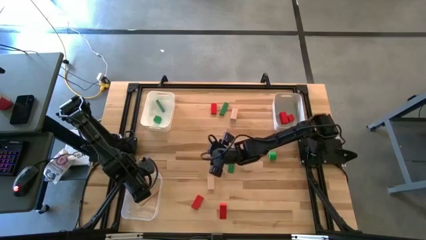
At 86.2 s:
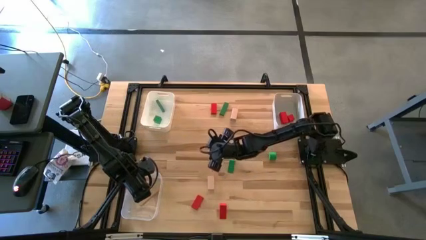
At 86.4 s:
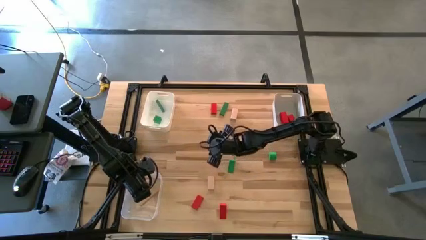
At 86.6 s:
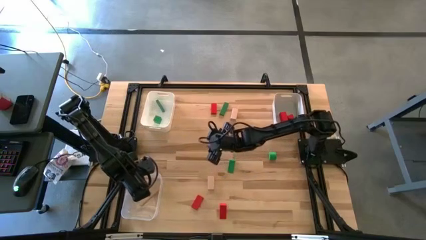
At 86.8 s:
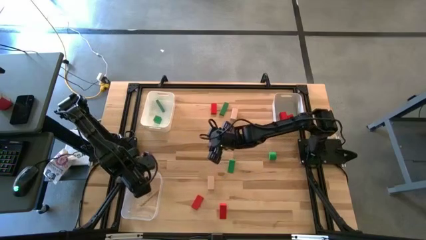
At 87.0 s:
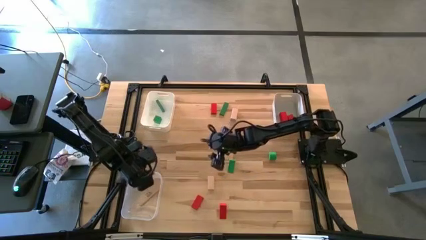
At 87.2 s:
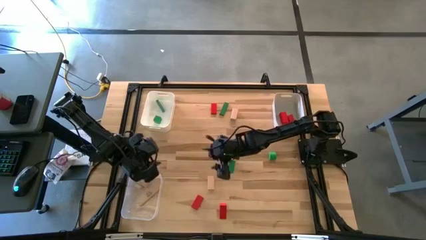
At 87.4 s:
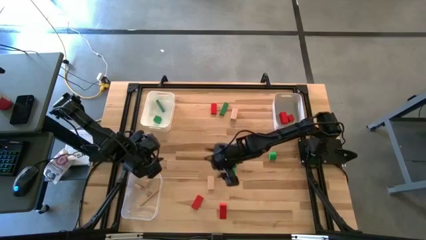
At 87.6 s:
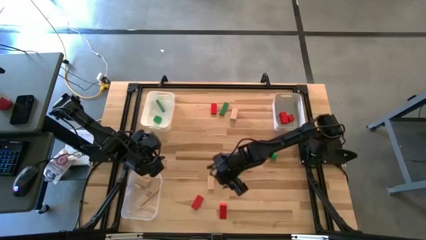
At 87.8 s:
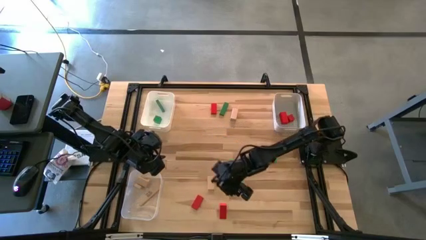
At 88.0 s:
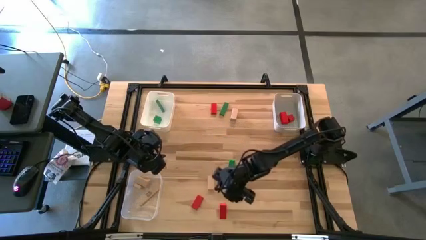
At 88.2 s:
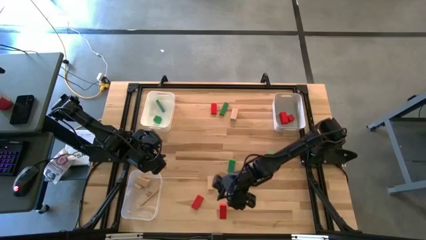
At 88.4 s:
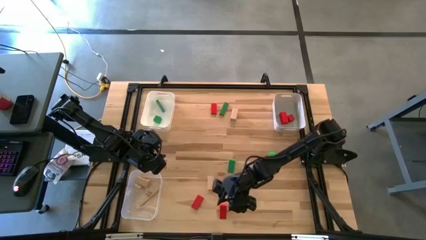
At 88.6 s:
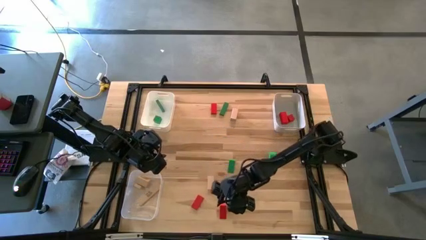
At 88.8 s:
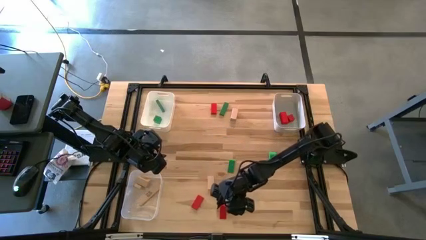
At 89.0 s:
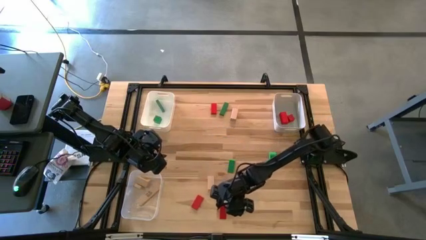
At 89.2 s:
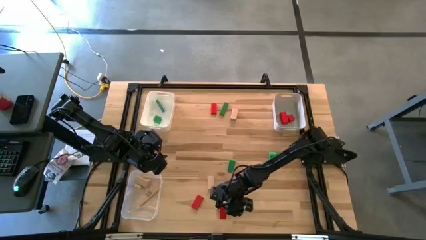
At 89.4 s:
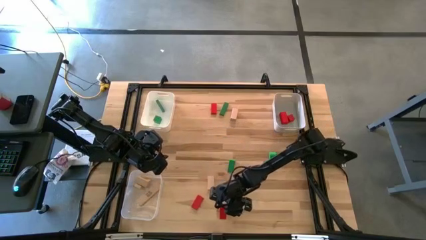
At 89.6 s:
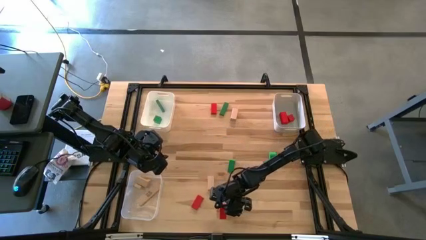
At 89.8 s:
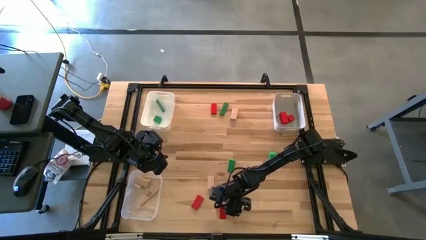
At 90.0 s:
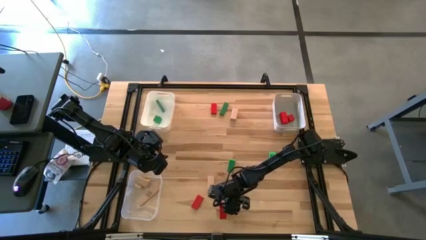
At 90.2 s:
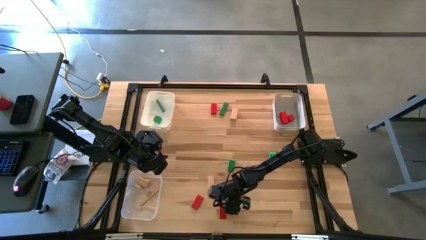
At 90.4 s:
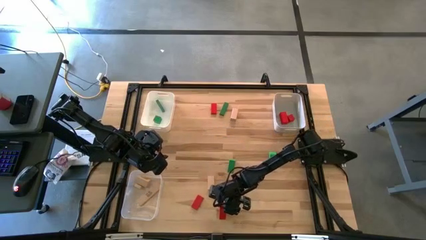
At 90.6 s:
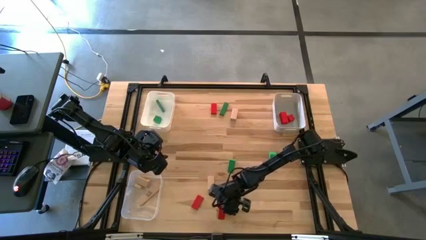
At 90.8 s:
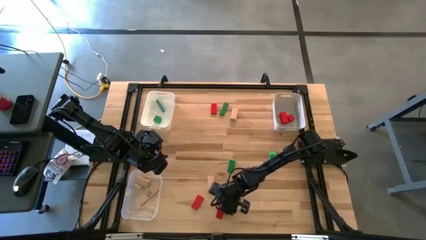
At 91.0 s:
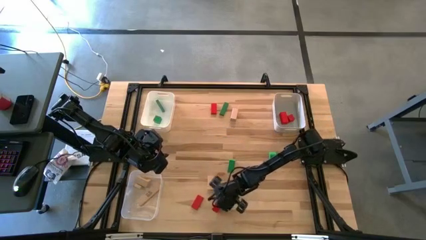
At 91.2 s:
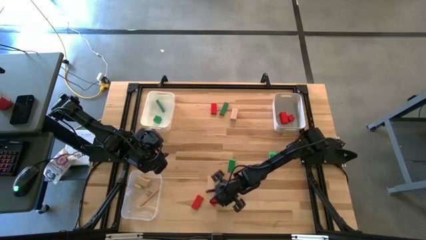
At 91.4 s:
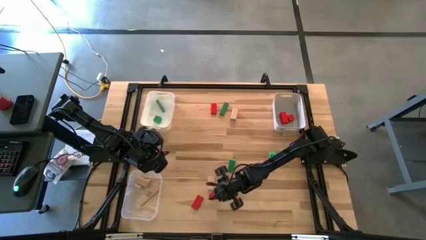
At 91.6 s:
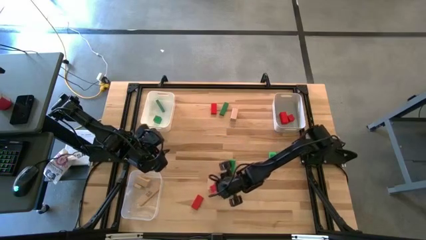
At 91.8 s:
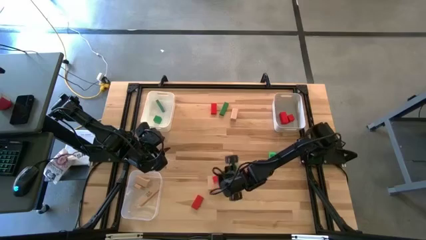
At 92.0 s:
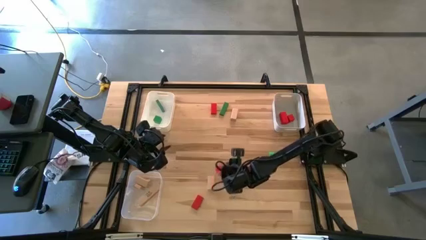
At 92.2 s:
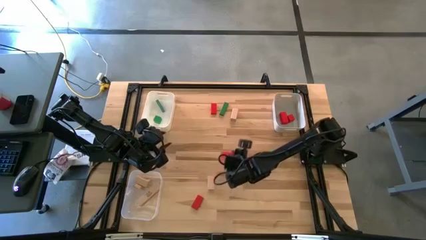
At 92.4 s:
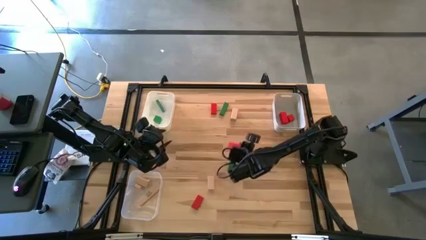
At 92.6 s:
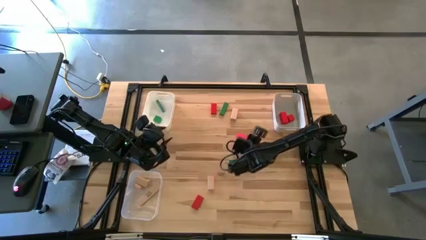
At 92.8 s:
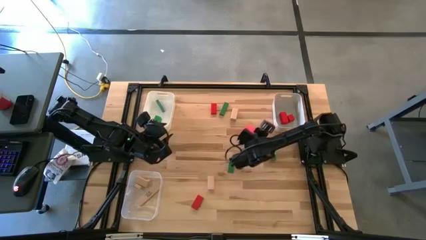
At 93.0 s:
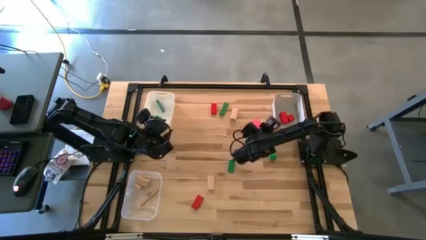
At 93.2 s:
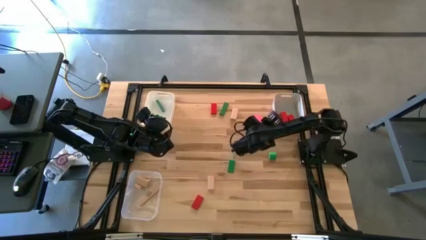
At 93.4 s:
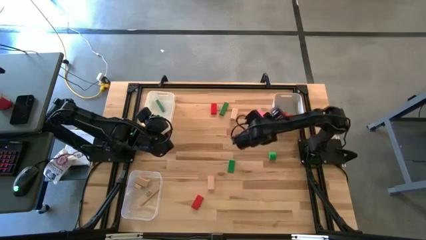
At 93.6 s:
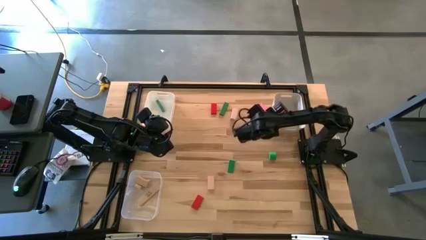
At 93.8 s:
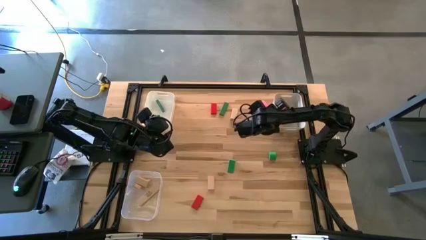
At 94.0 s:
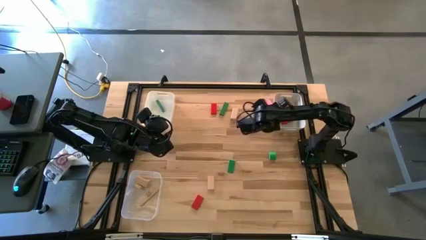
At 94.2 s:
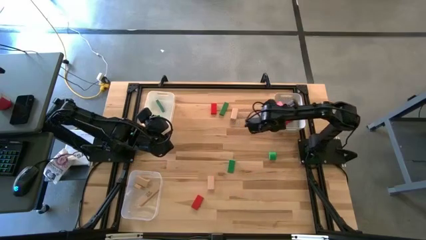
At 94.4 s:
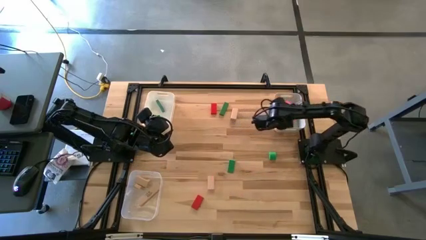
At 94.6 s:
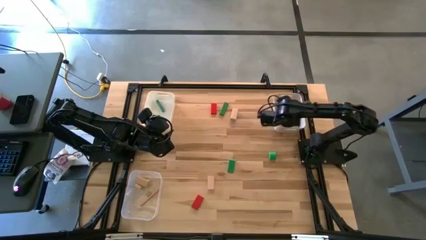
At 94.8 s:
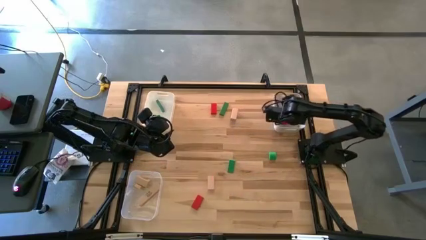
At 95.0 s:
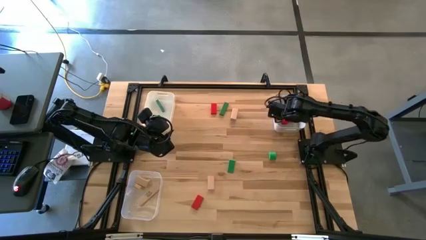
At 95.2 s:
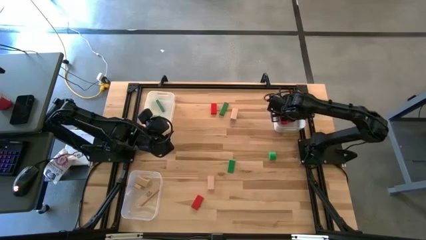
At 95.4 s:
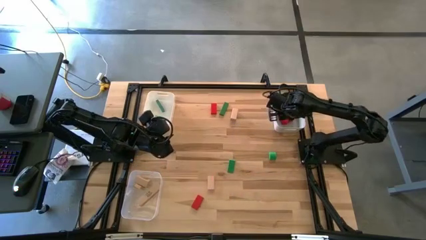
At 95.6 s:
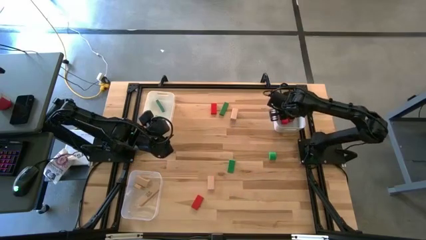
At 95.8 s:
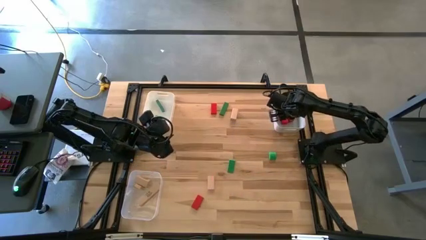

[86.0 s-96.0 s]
Task: Sort & place blocks by color
Put the red block into the gray bin
